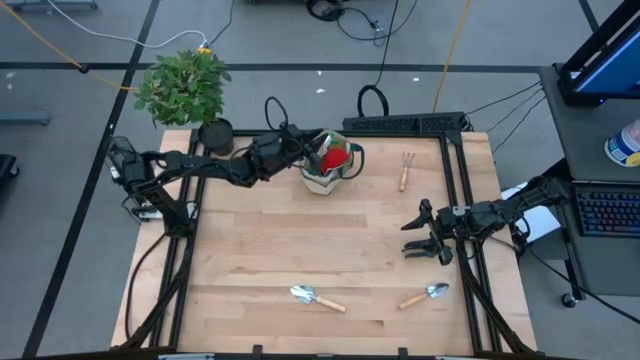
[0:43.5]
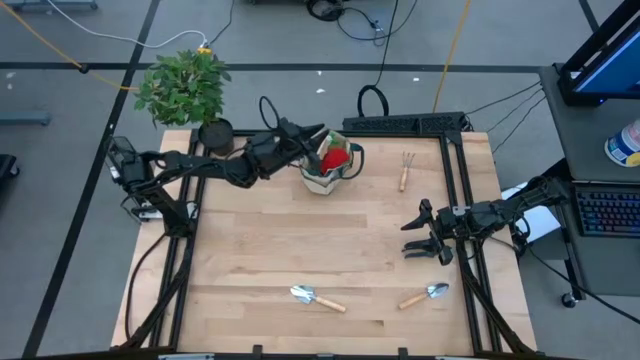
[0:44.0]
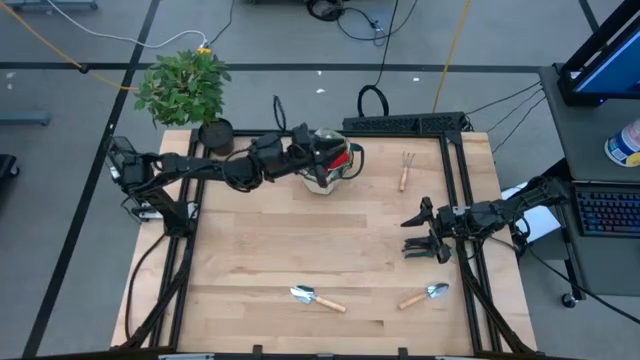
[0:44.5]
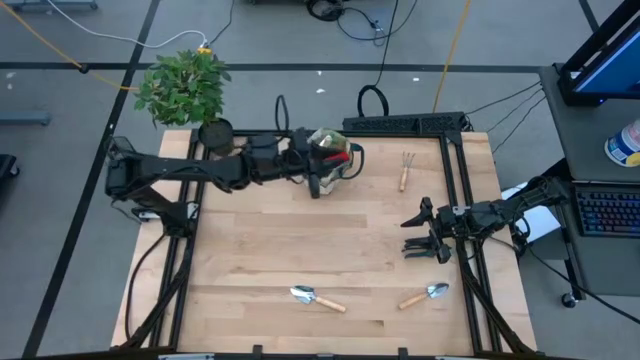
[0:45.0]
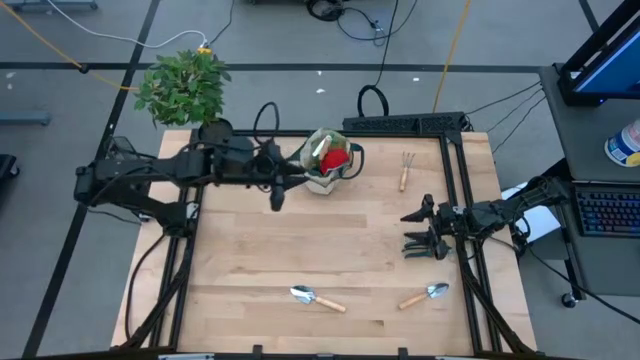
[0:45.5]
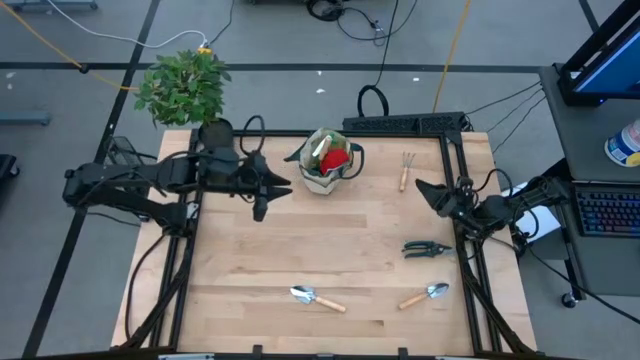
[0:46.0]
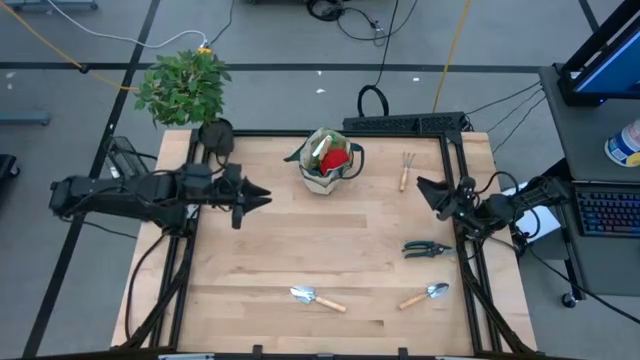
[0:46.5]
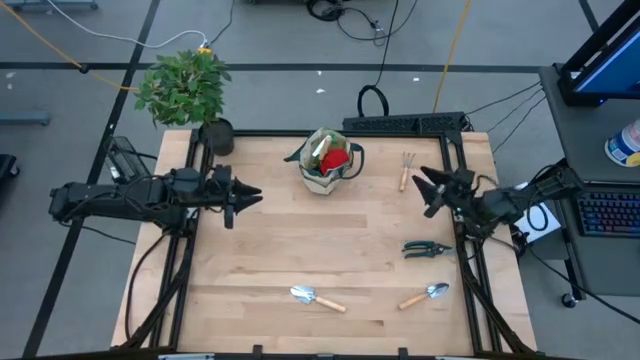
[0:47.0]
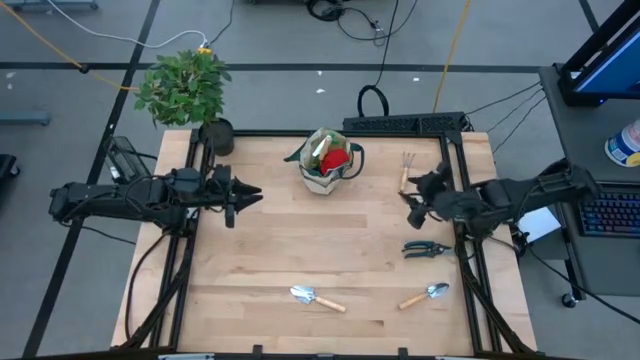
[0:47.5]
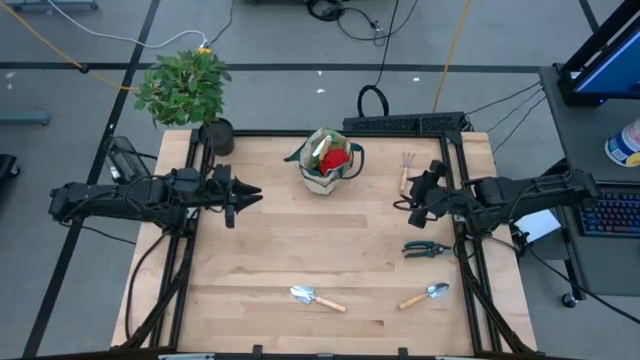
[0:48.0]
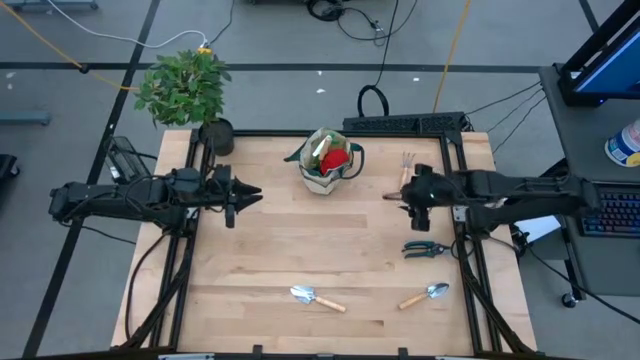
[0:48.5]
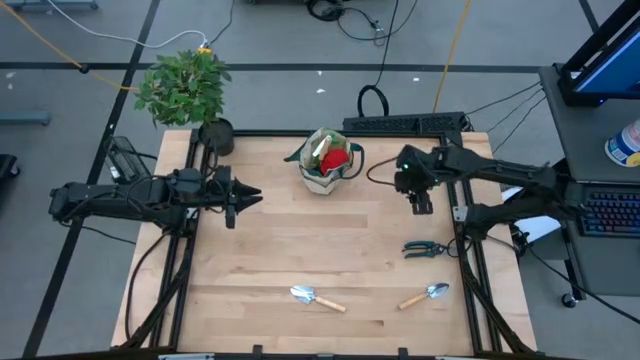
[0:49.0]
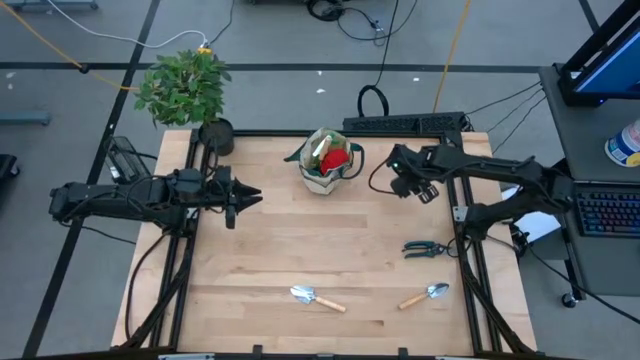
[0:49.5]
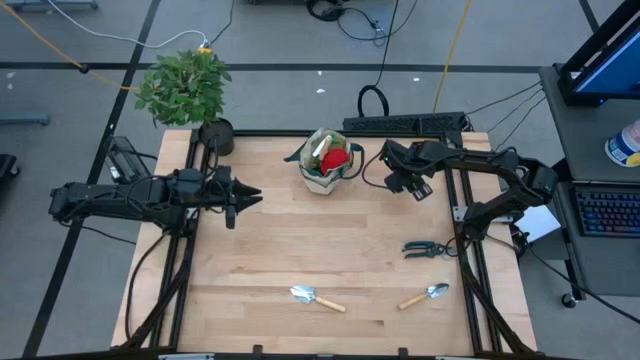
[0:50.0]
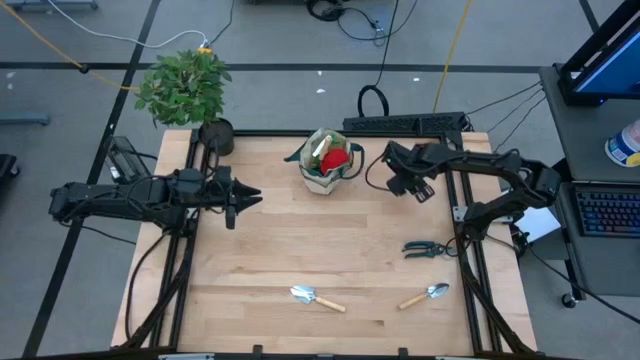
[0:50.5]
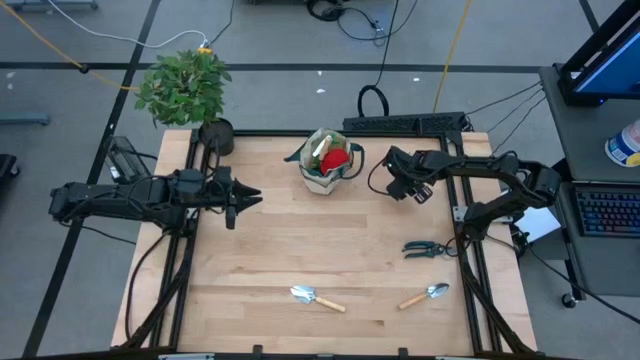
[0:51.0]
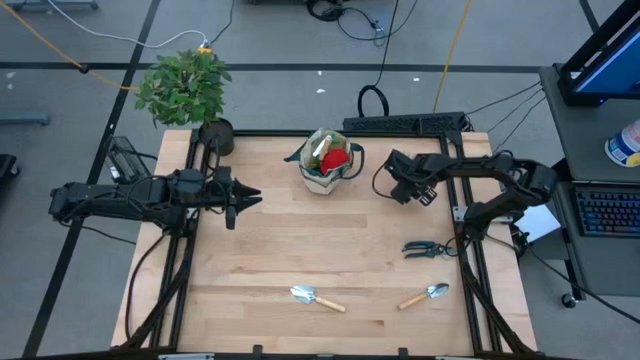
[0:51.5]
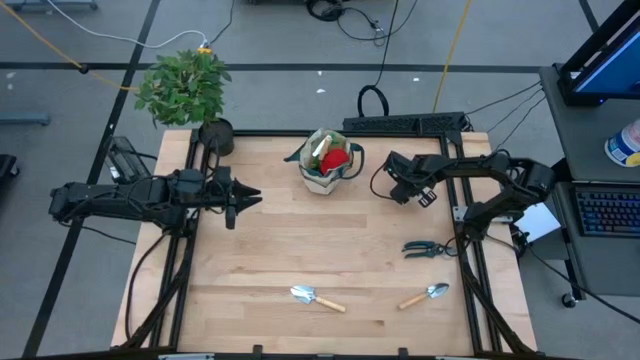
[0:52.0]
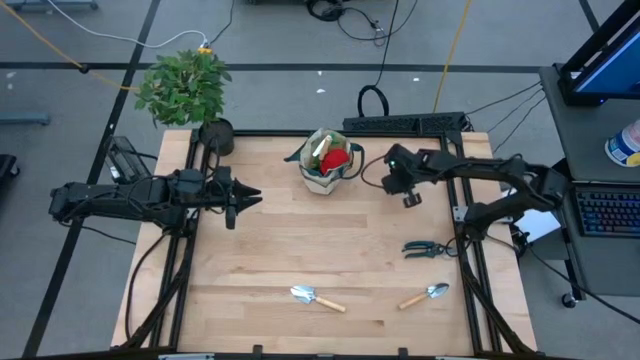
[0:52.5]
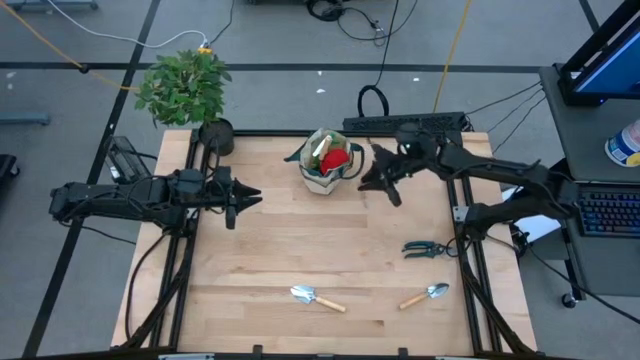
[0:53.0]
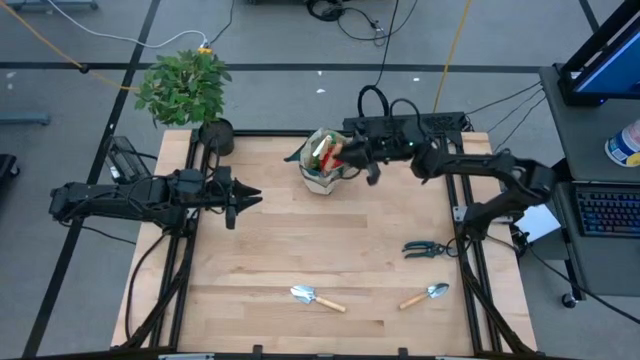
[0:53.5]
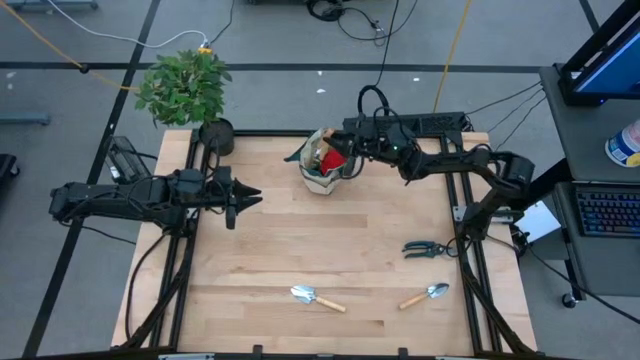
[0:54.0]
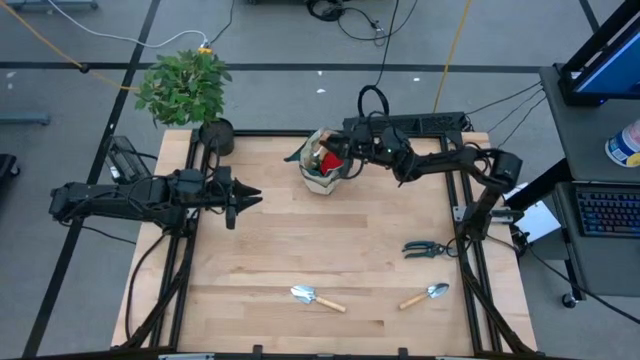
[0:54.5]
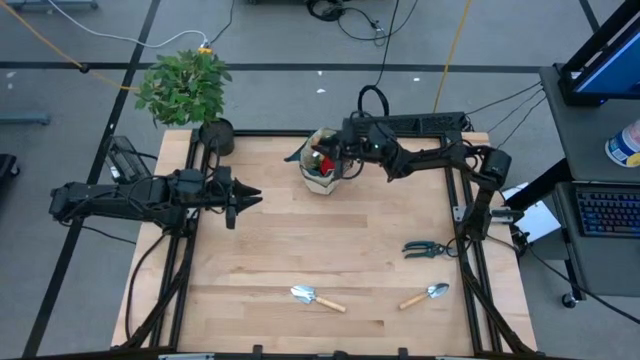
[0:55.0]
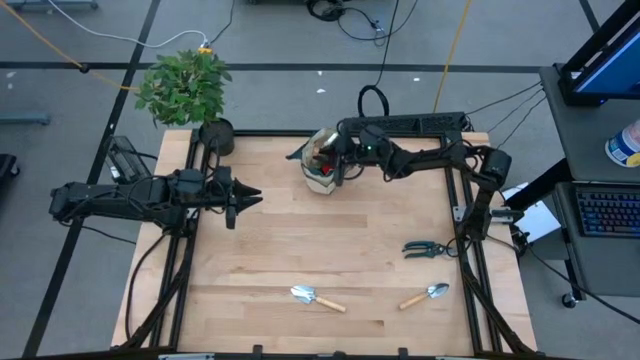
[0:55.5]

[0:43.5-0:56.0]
Task: Pick & Place Garden tools in Gardening bag
Put the gardening fork into the gardening tool bag

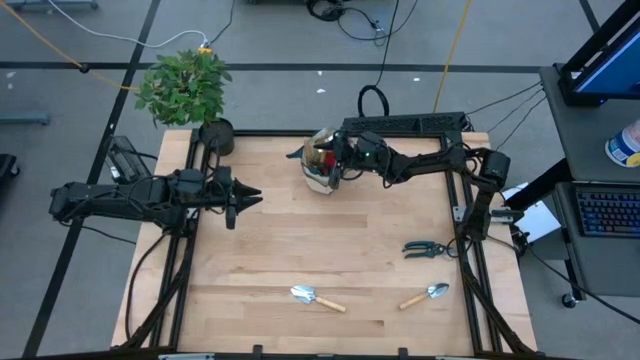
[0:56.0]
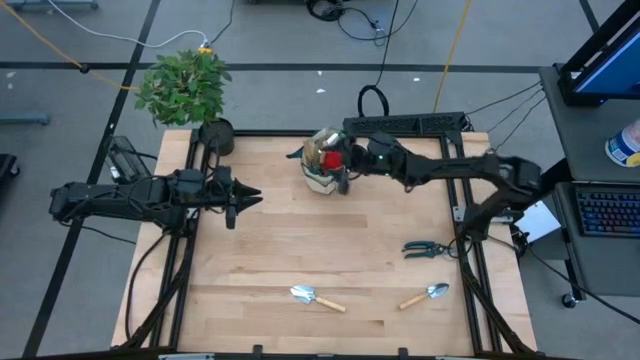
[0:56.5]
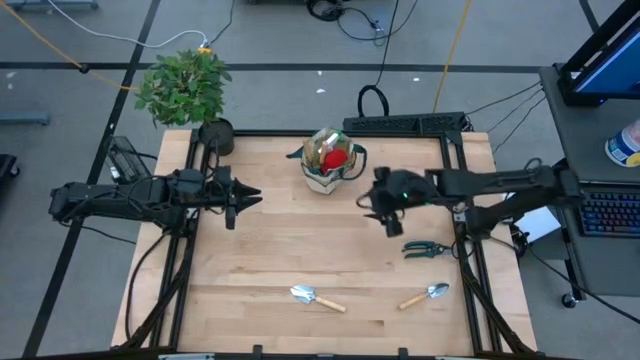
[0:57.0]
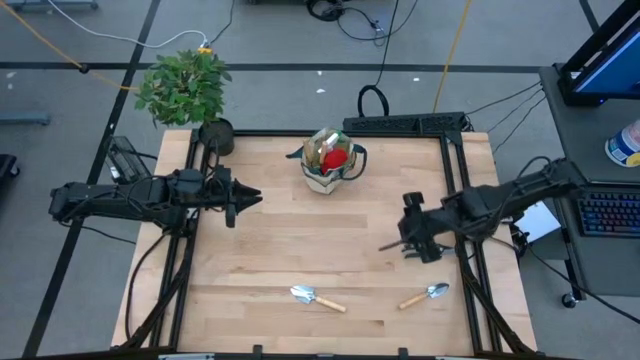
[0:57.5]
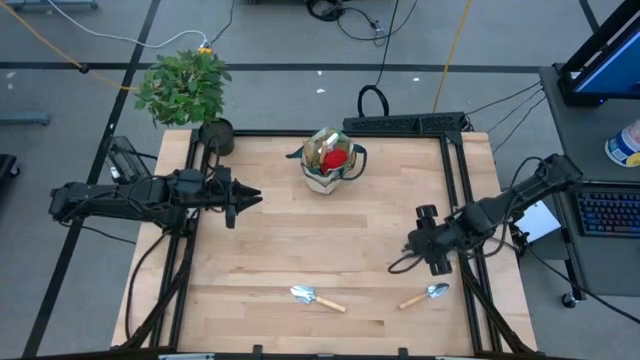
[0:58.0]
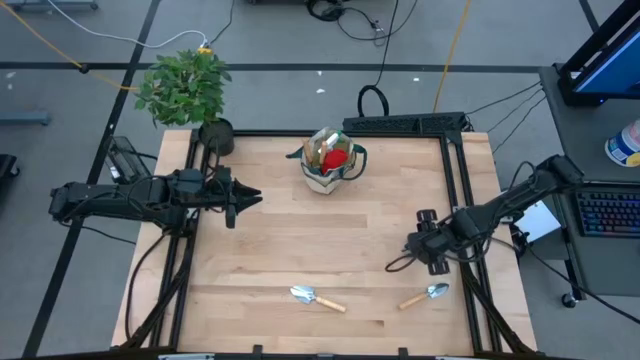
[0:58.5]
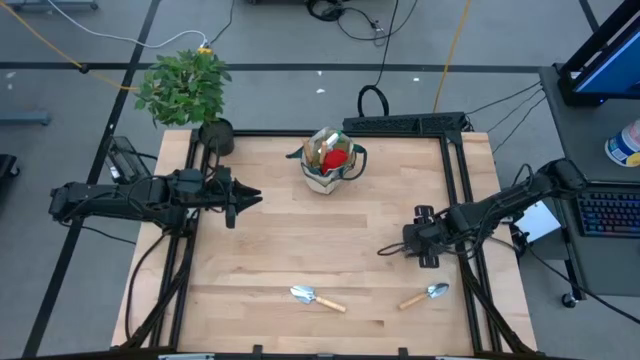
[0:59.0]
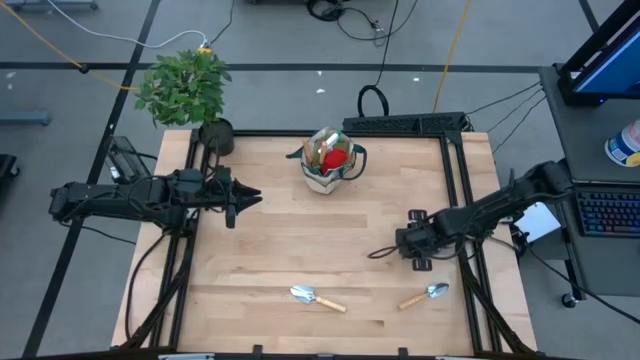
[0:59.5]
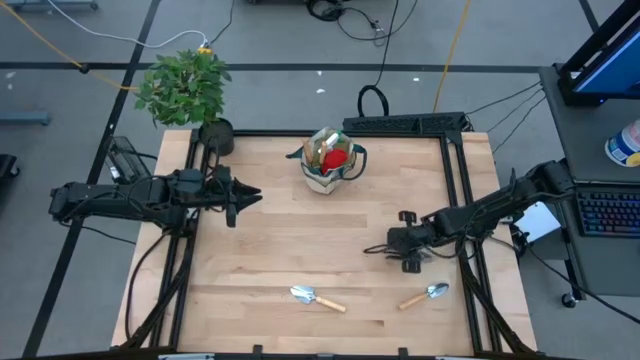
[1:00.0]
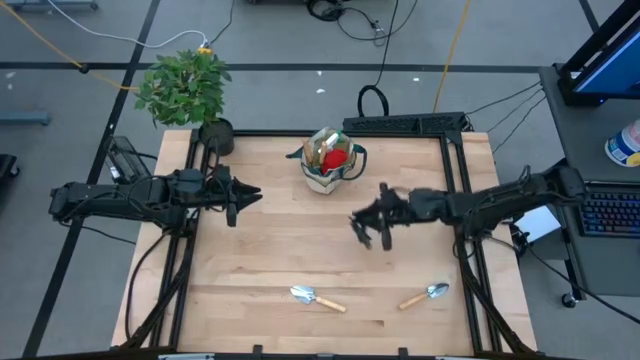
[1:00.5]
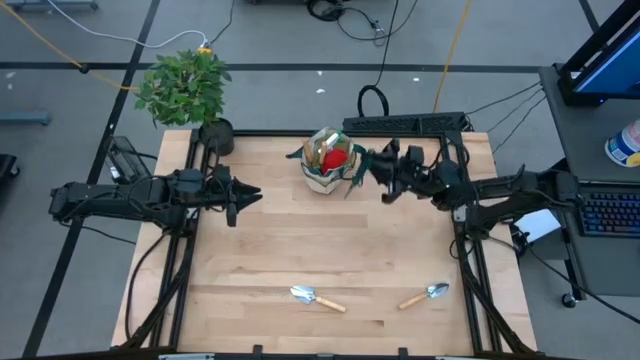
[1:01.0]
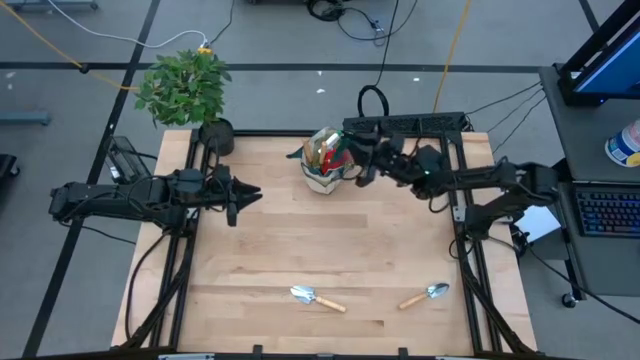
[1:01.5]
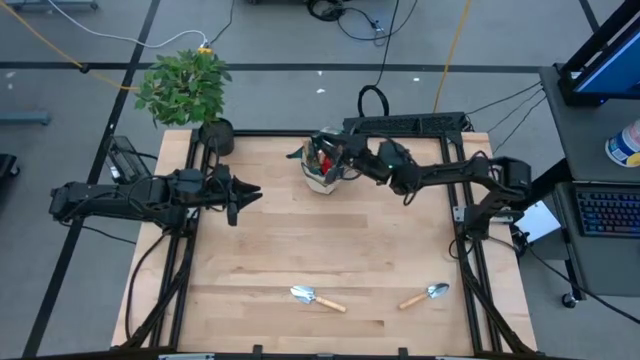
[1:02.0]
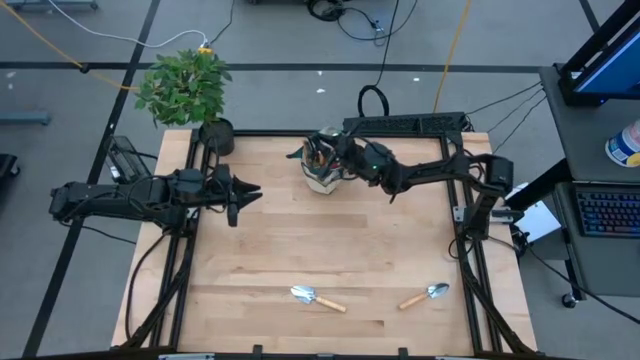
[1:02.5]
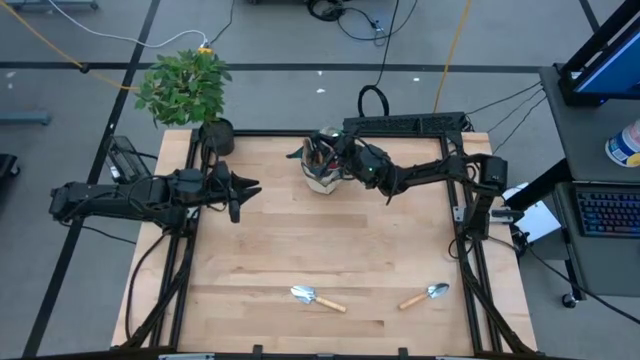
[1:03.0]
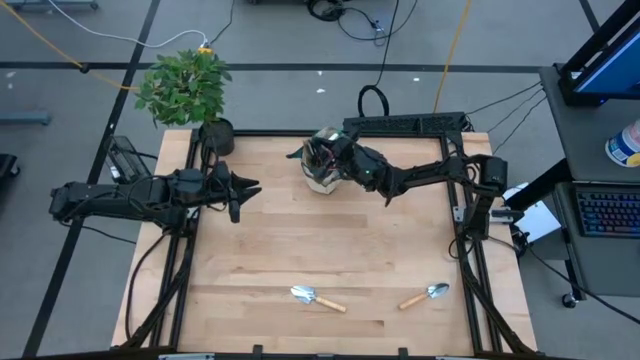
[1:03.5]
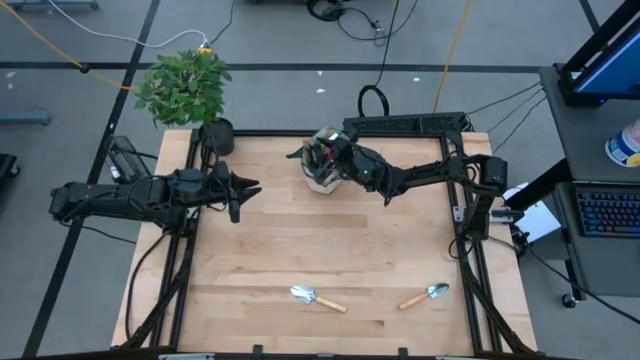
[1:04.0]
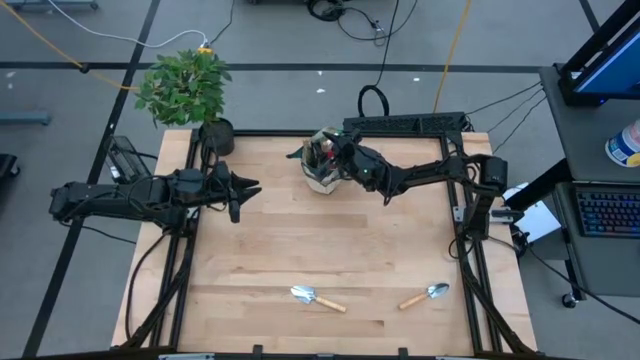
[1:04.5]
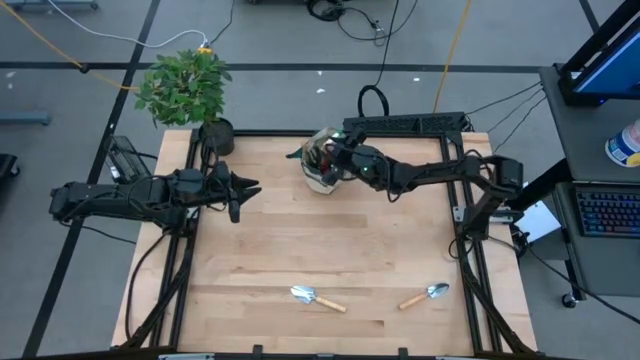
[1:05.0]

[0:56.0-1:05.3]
Put the pruner into the gardening tool bag
